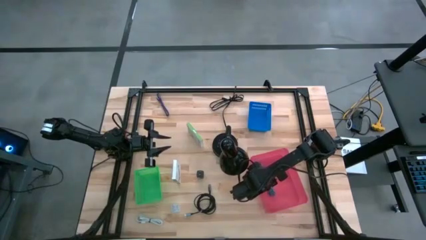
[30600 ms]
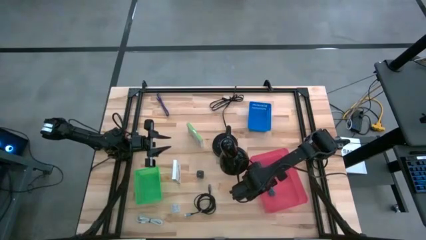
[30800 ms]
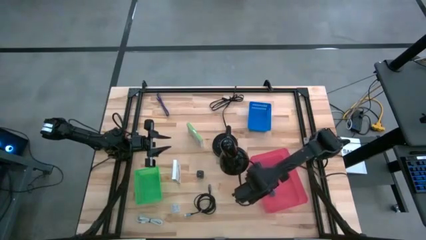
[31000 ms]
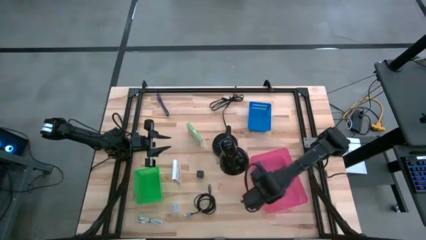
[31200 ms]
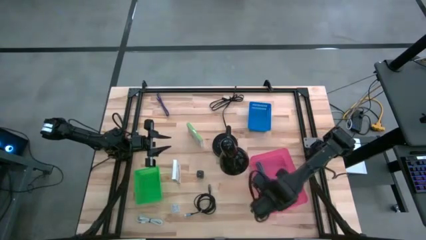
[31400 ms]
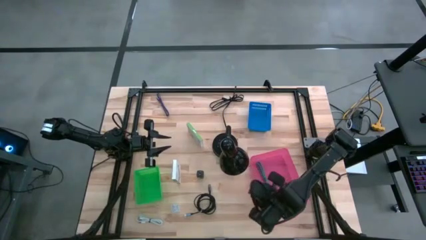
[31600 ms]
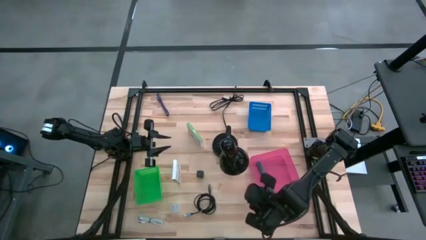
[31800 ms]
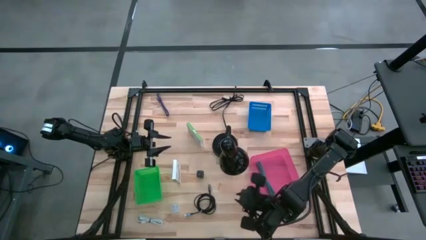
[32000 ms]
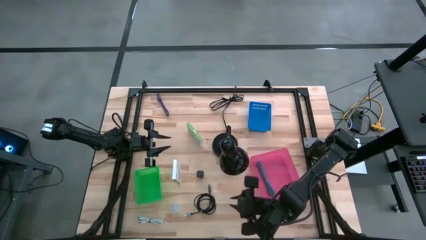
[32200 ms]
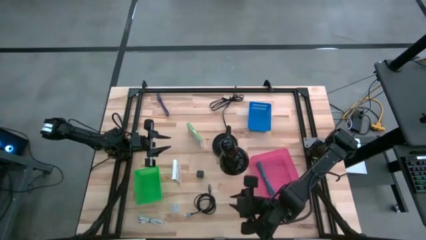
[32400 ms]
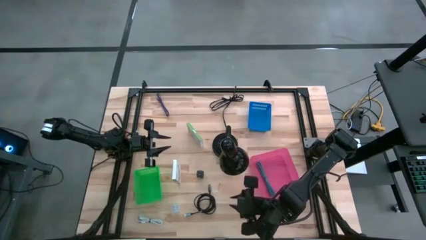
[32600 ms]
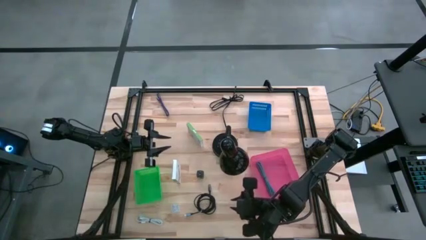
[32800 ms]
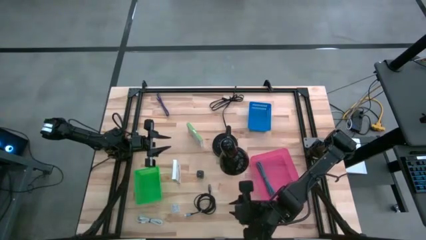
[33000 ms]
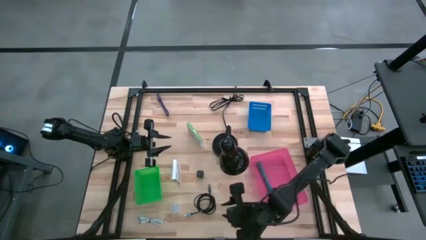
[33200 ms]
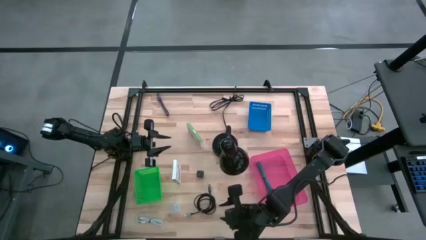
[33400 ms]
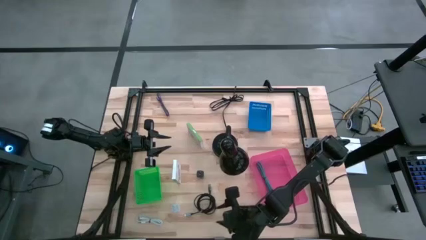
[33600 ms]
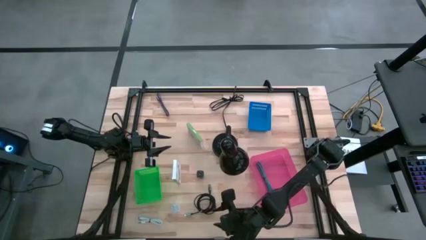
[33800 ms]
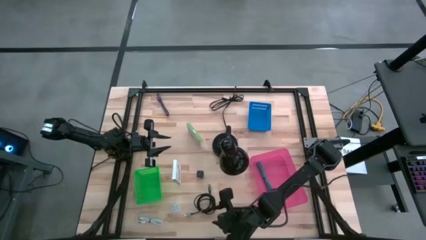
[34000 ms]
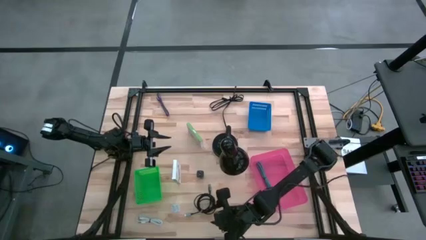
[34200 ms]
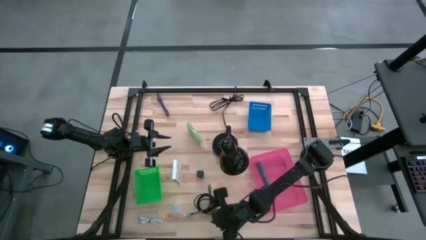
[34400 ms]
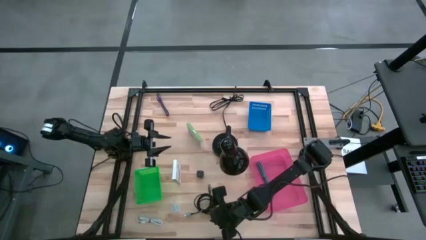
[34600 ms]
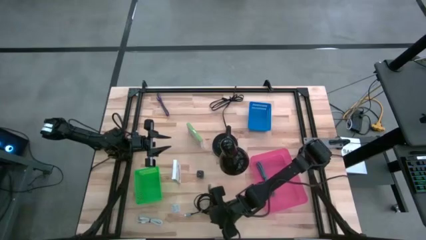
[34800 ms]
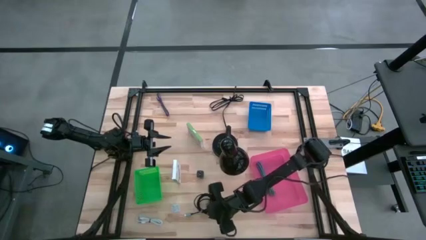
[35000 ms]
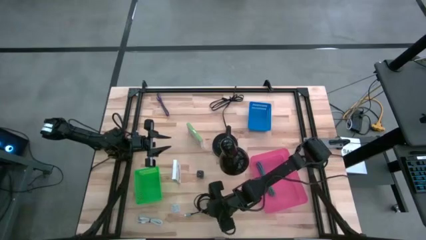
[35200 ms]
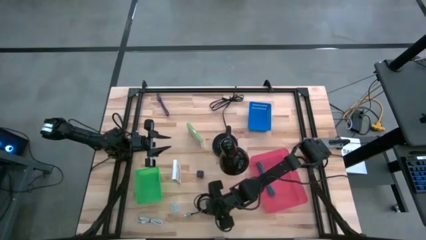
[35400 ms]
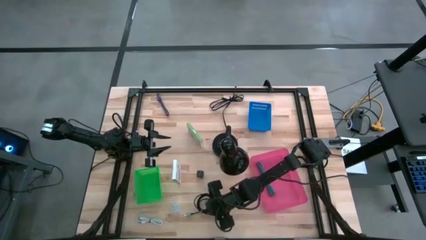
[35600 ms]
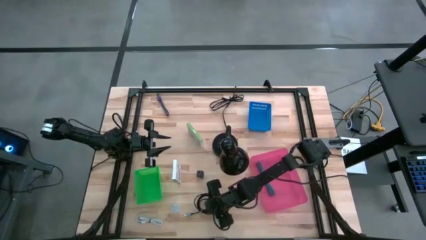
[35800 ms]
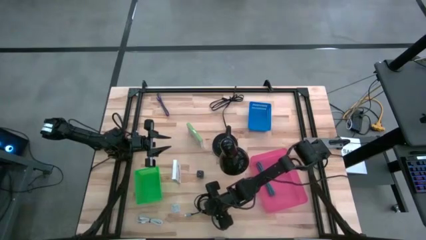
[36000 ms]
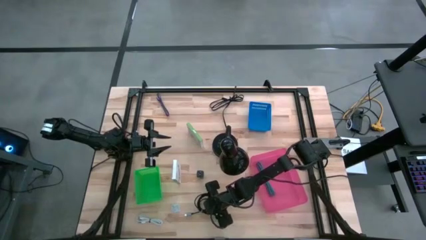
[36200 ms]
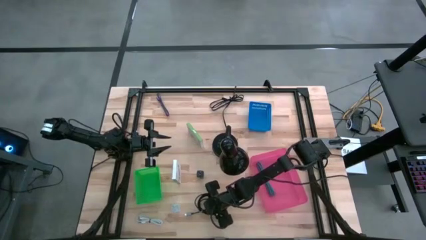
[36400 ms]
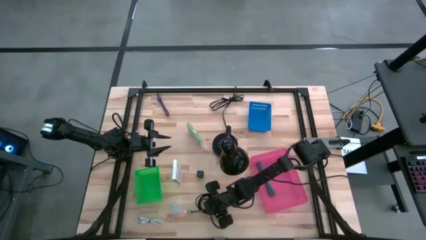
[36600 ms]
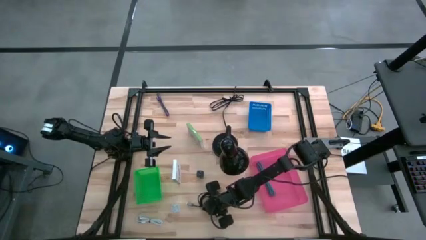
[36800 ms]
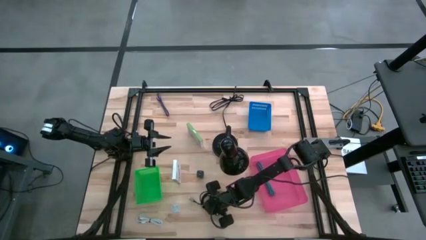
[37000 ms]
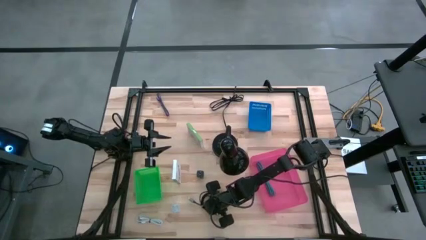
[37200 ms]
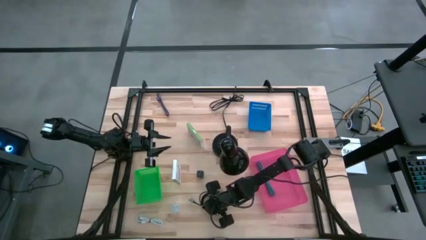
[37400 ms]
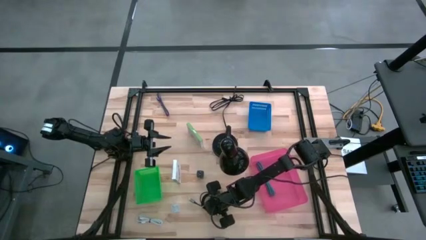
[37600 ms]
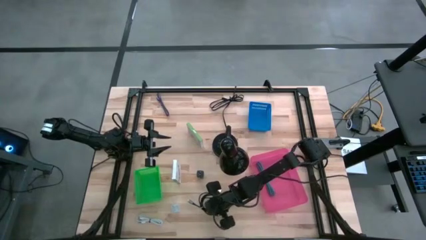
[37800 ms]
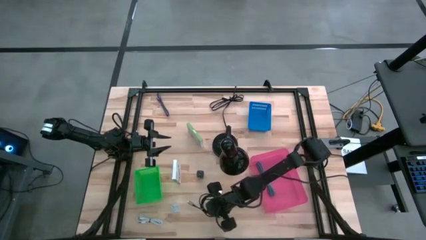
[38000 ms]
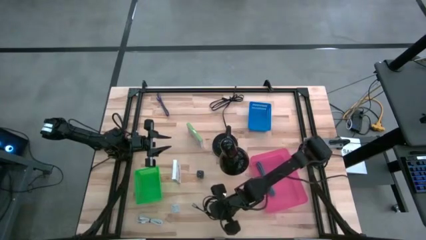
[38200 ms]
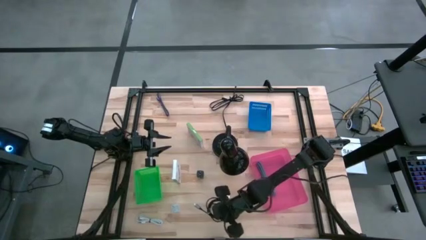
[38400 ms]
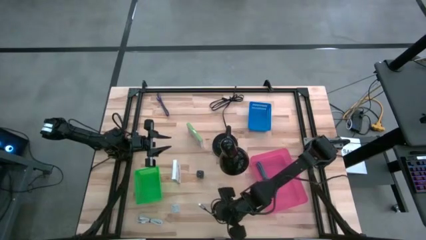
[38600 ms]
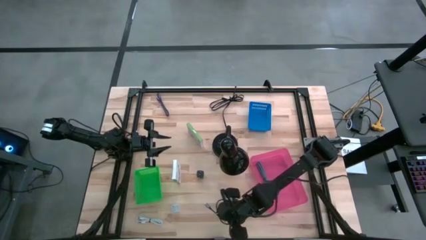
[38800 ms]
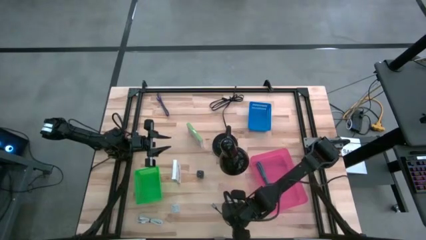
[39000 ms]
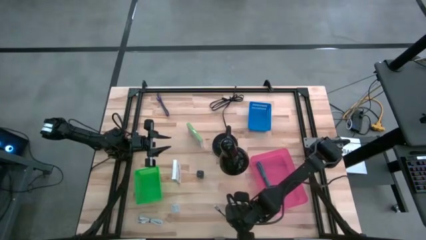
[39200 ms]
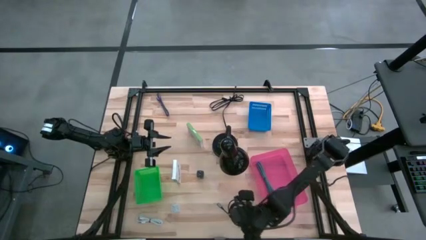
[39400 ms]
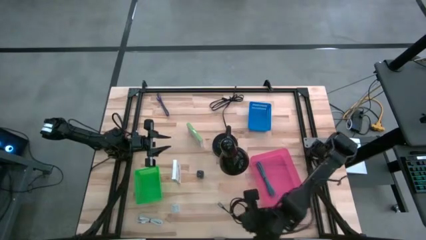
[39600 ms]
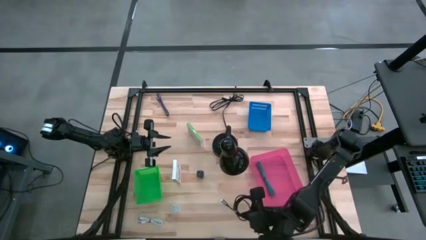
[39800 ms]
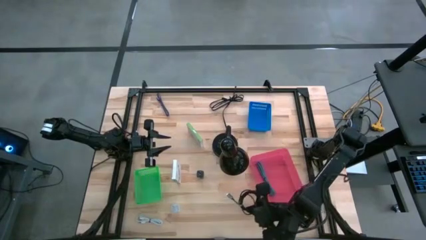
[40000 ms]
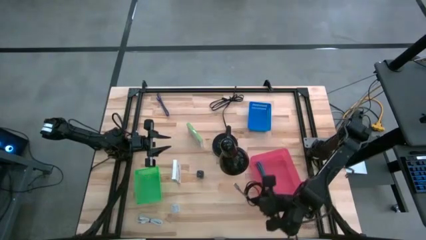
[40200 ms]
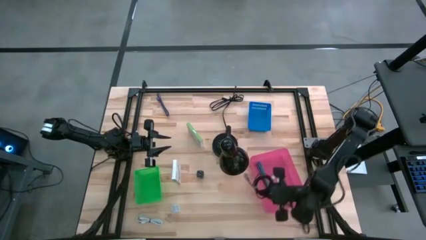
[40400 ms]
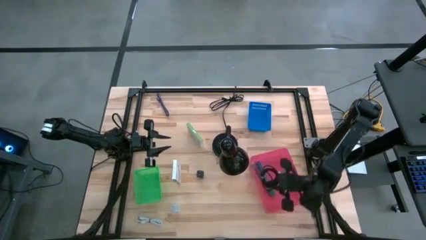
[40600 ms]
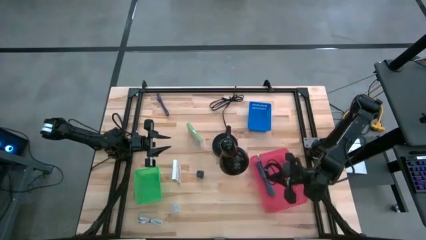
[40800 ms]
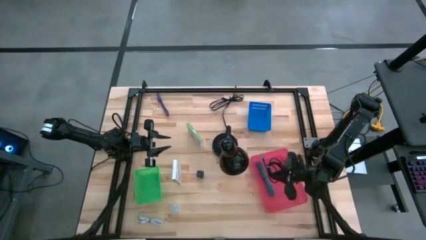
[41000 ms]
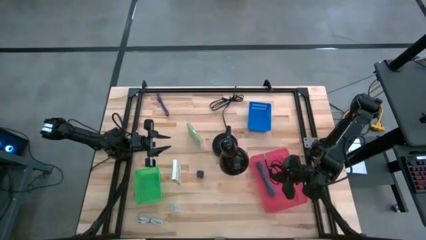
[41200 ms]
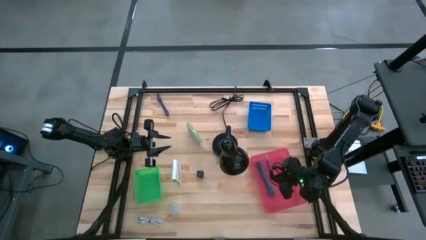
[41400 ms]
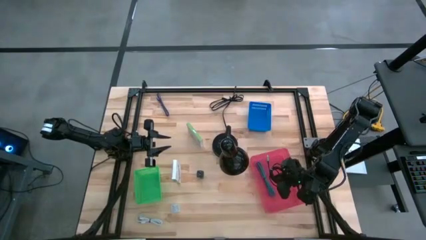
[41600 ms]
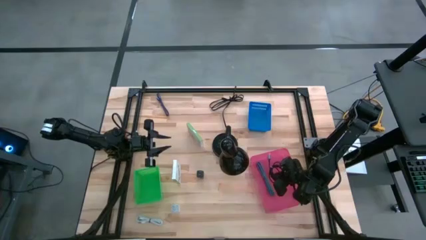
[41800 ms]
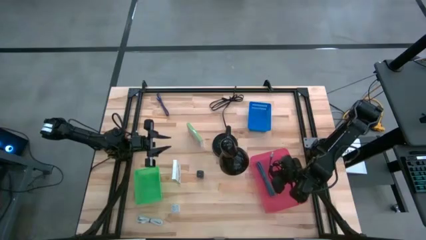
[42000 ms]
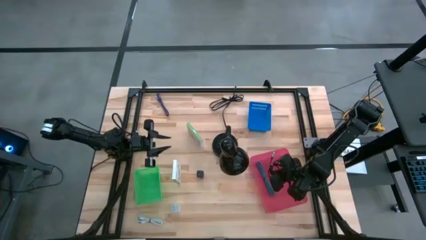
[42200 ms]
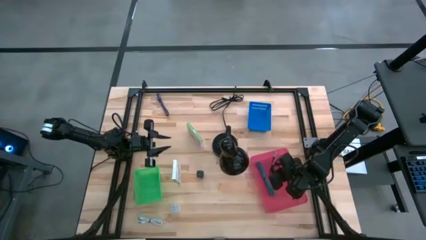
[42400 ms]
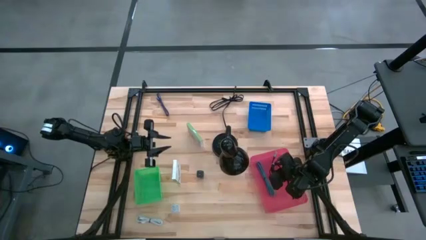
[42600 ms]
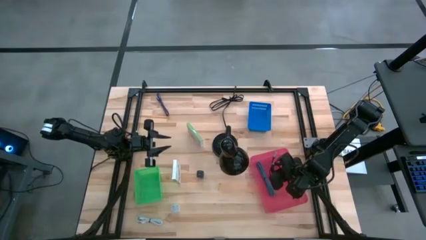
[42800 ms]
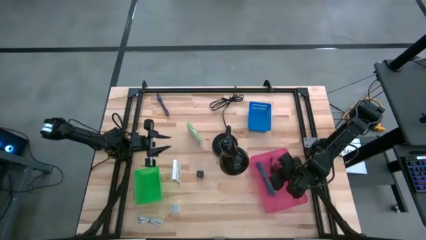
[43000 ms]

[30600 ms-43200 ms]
Task: Pick and place items into bin
Put the black charger cable into the red bin

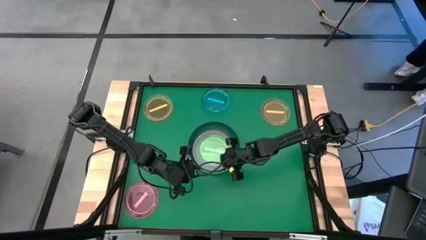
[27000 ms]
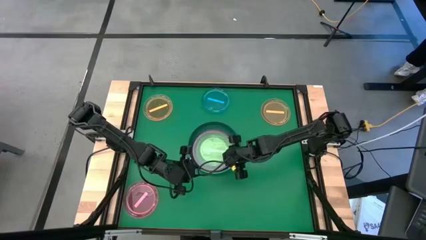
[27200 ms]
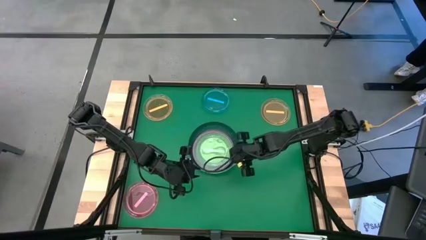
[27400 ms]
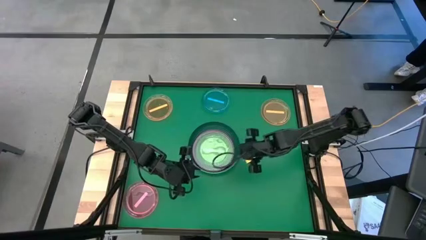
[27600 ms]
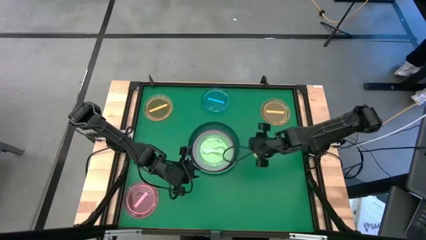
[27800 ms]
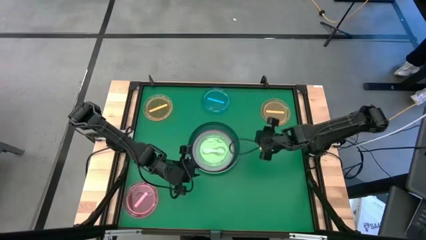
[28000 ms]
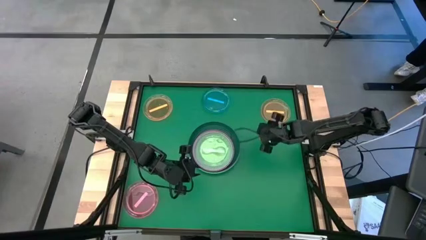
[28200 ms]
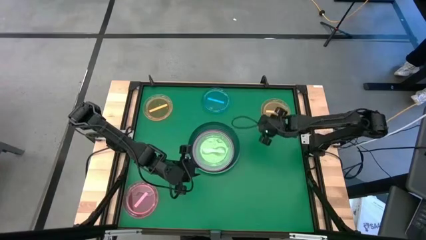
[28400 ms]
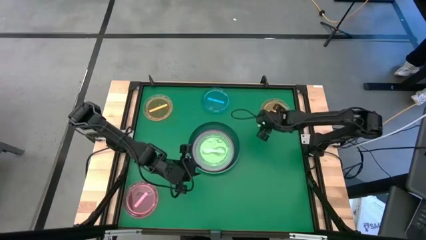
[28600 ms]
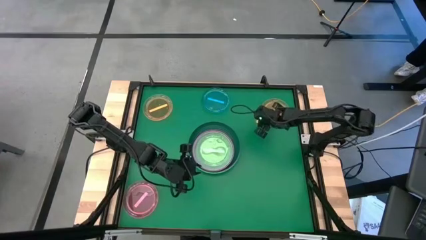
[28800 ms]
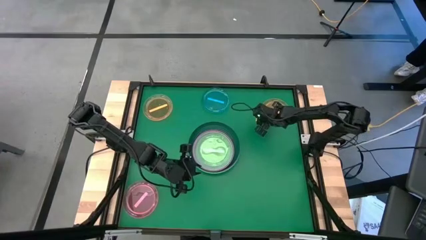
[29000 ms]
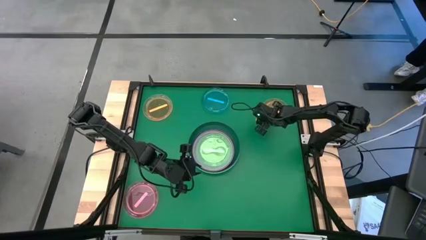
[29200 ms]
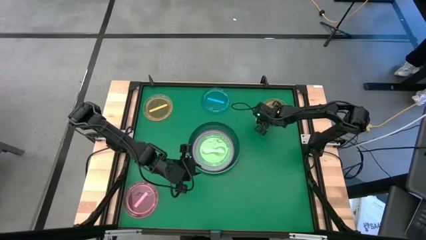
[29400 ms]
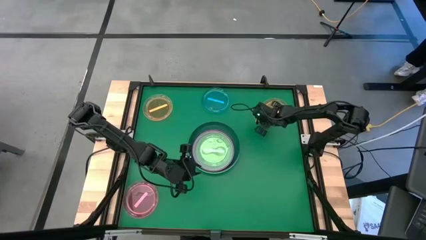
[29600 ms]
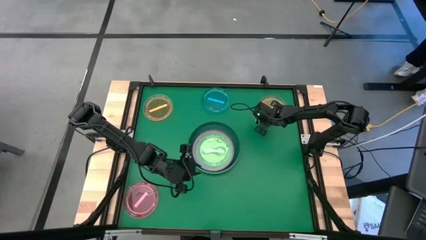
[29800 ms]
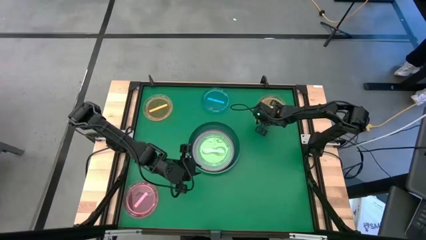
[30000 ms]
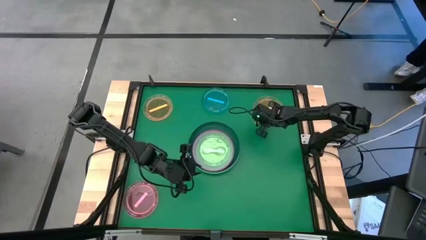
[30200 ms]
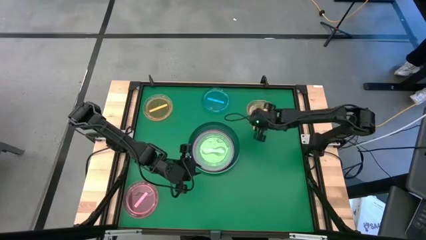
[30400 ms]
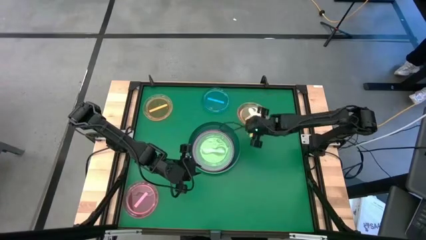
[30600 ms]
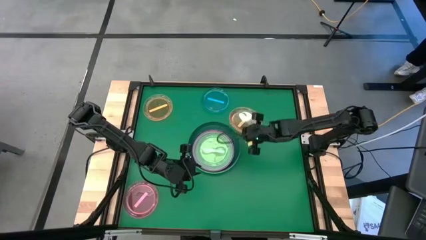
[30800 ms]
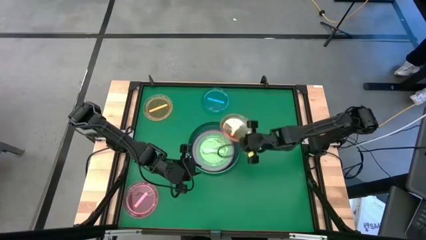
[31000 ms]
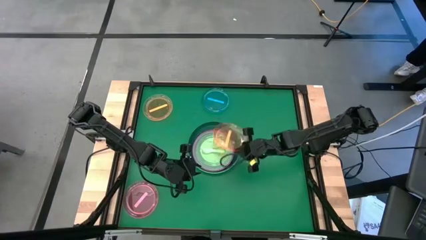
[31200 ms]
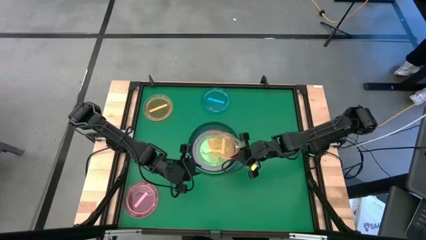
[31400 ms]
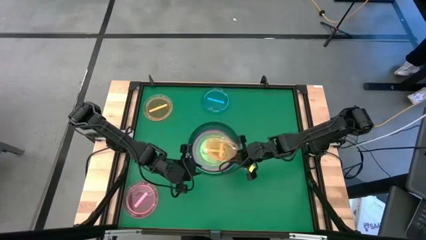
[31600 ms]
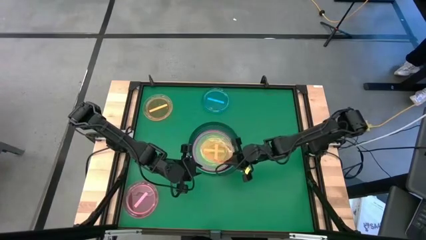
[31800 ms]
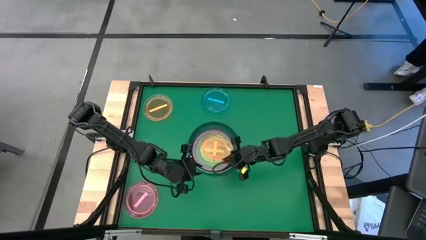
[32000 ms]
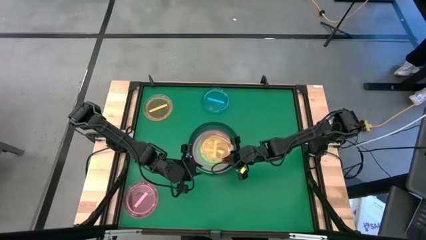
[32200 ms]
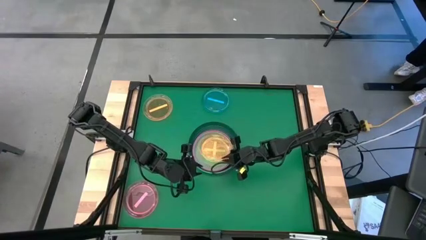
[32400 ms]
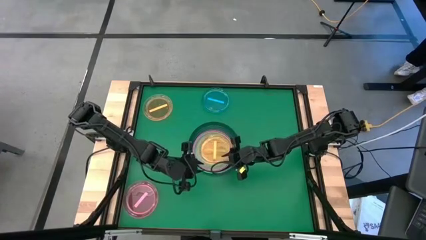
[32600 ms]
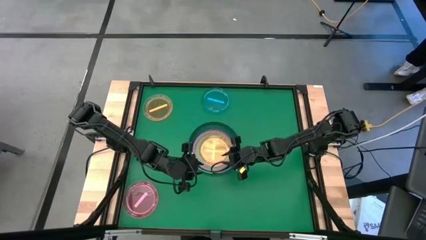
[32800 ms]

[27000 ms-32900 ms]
Task: Stack plastic plates
Stack the right orange transparent plate on top of the green transparent plate
